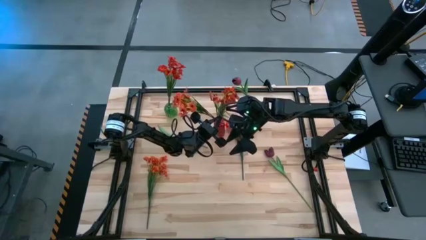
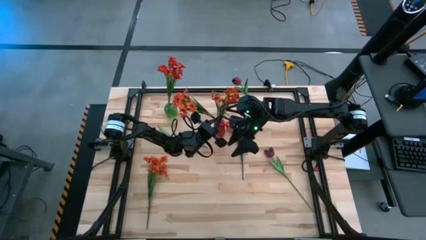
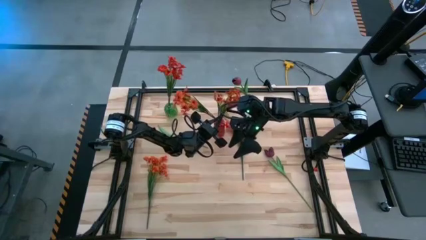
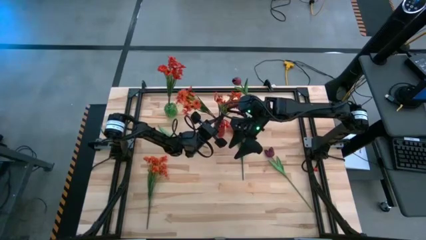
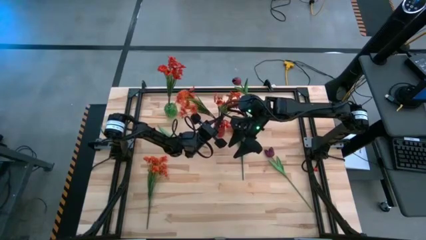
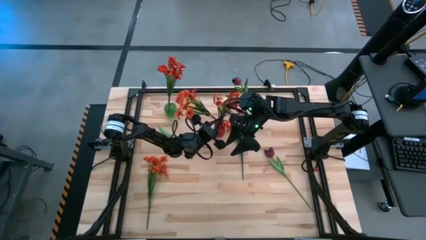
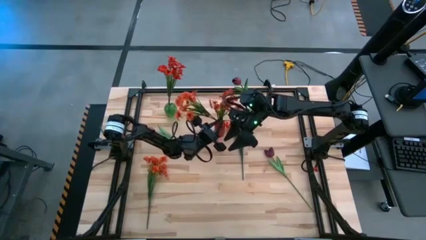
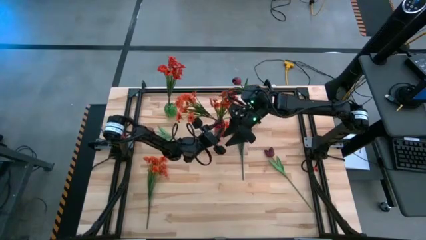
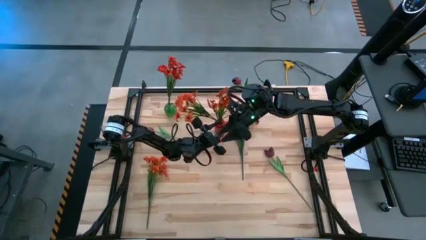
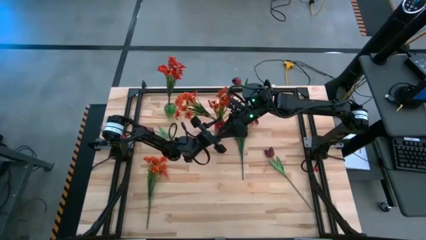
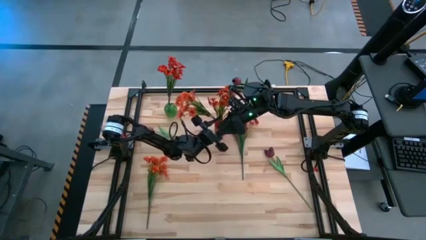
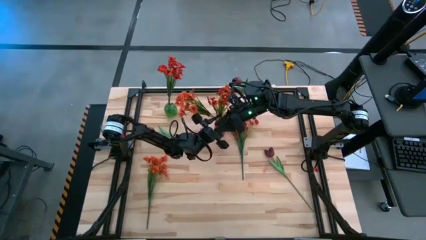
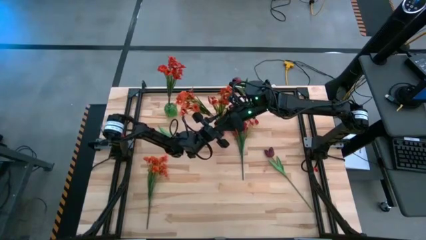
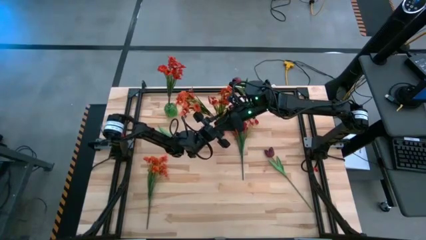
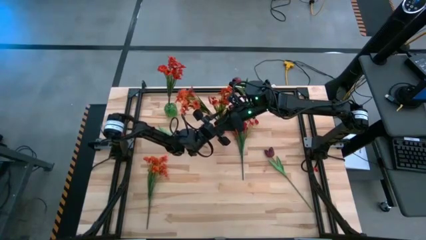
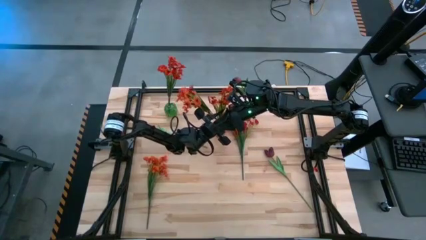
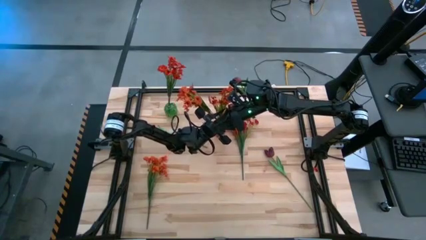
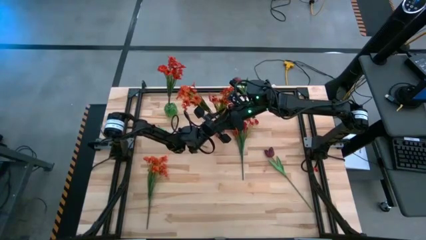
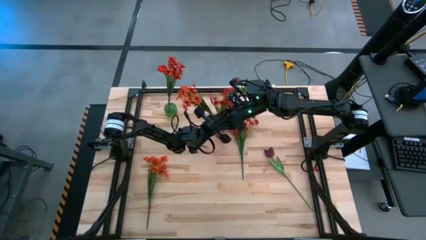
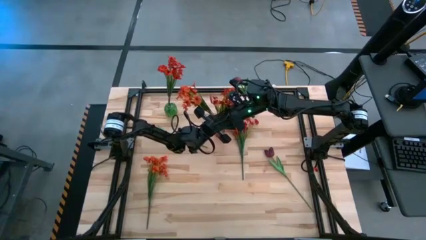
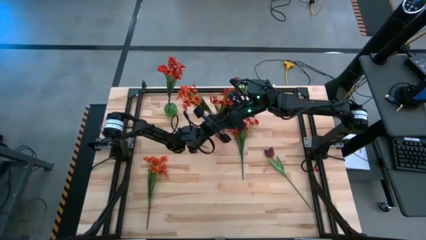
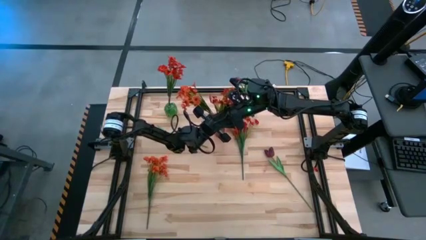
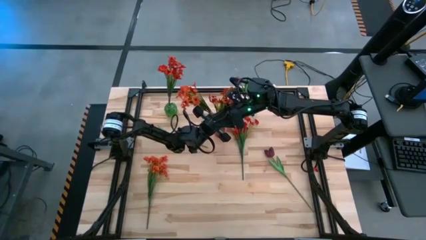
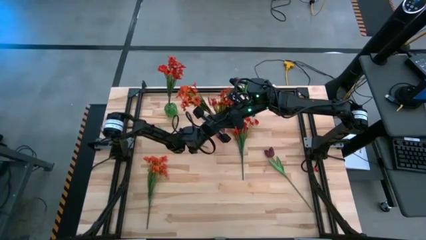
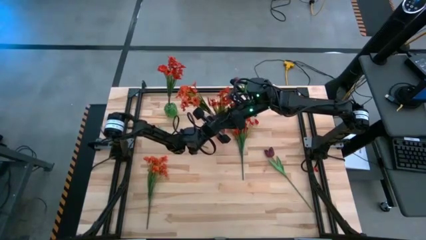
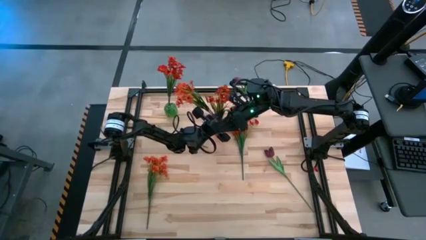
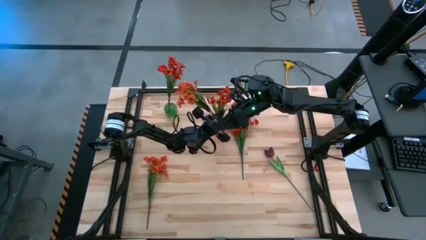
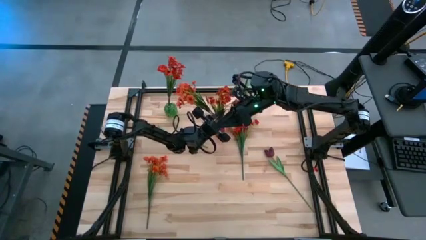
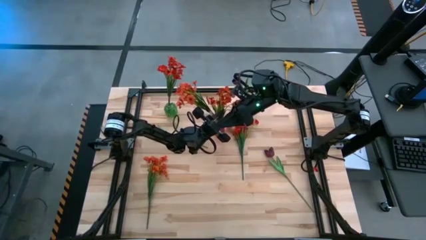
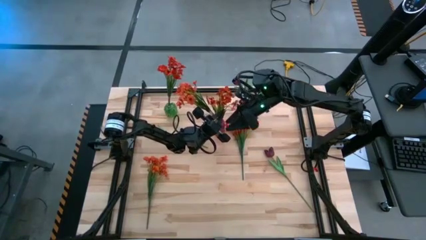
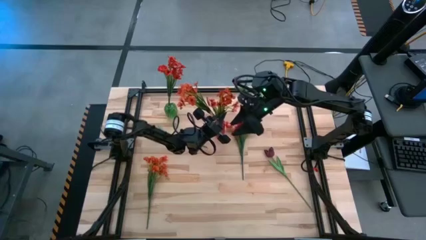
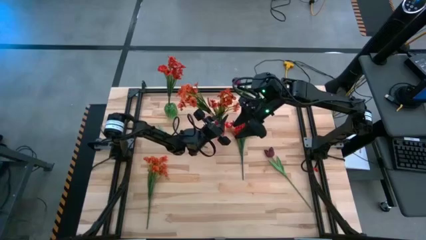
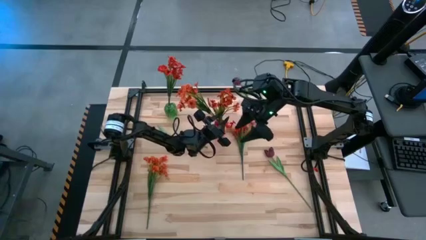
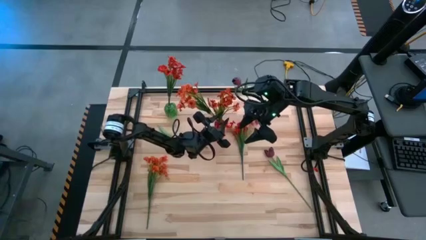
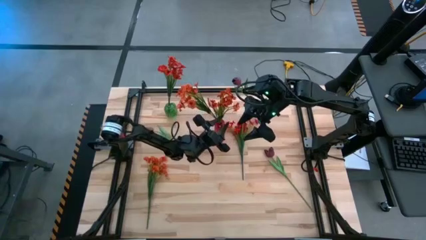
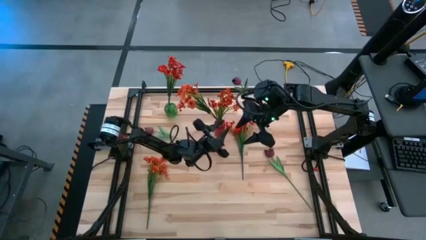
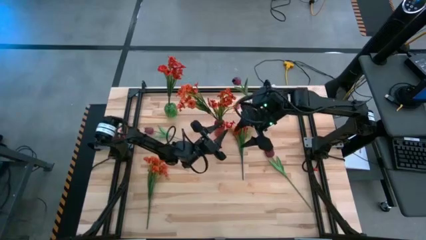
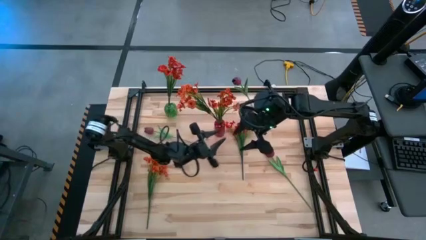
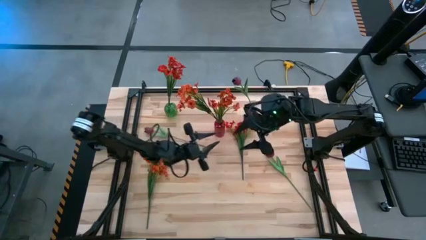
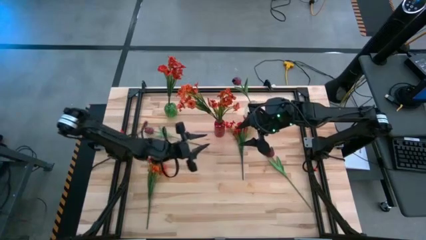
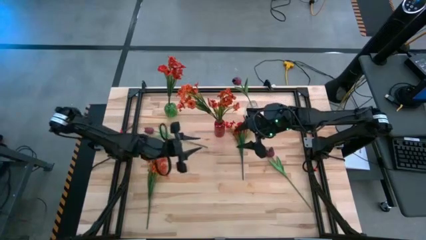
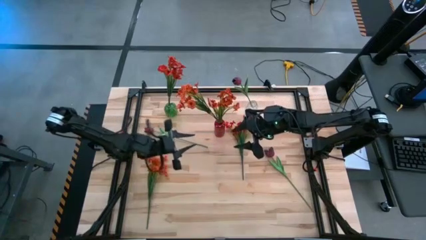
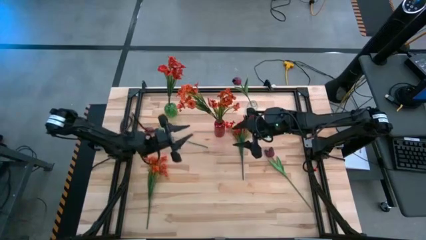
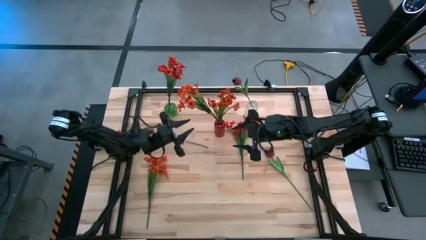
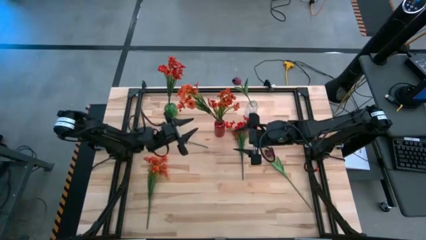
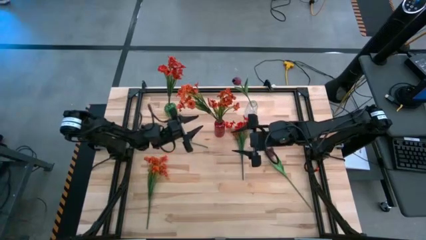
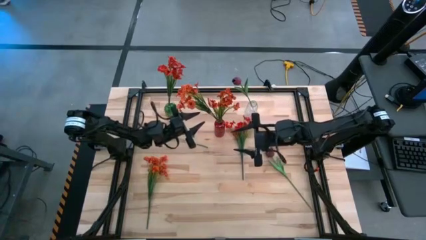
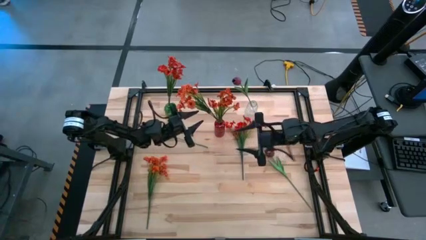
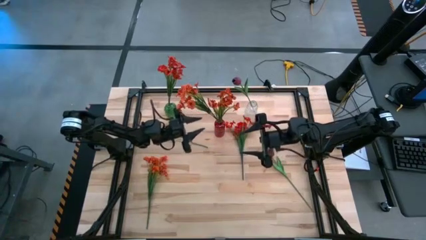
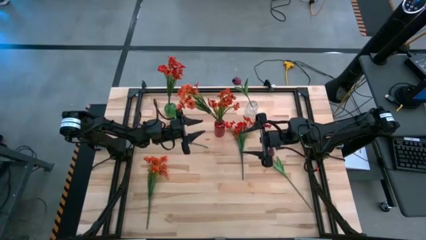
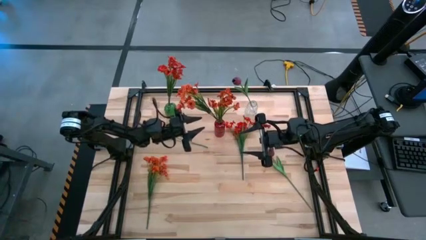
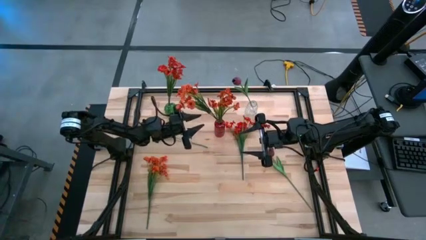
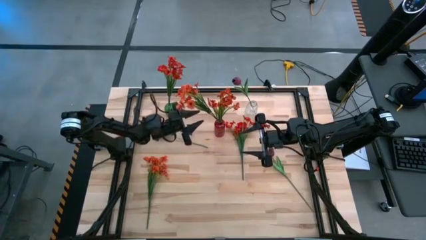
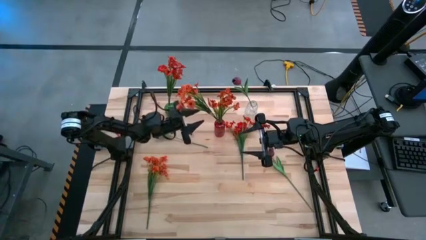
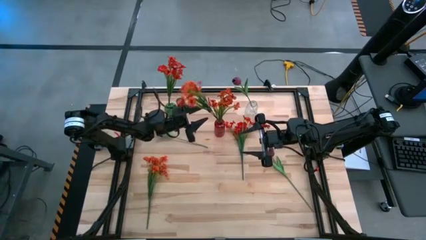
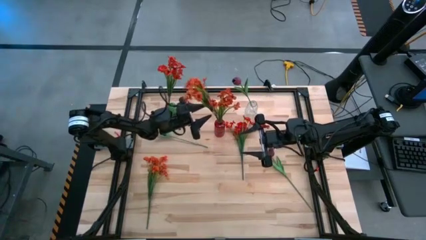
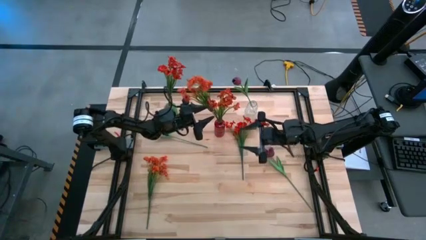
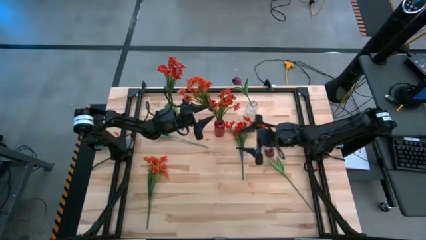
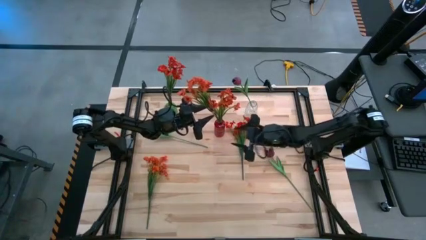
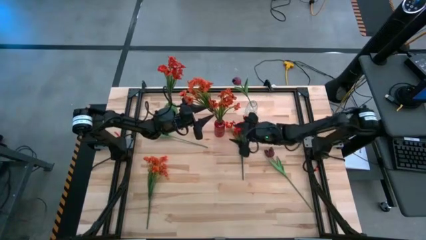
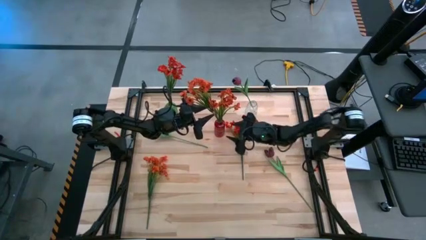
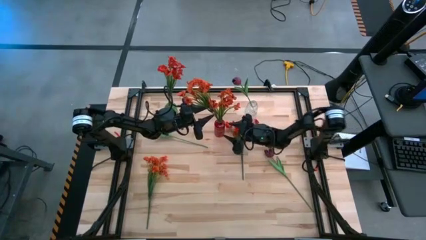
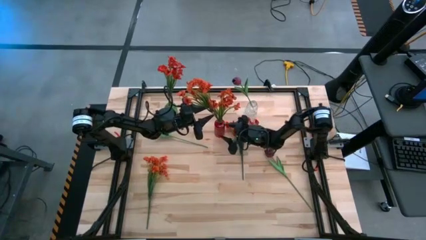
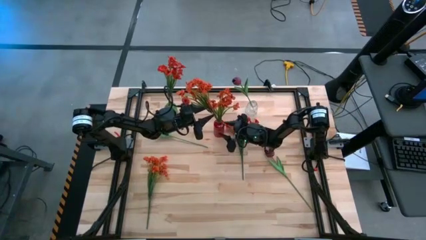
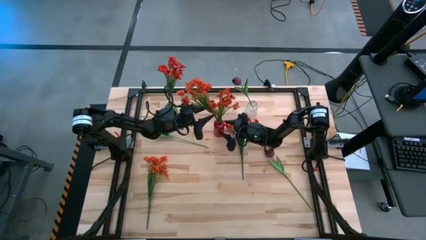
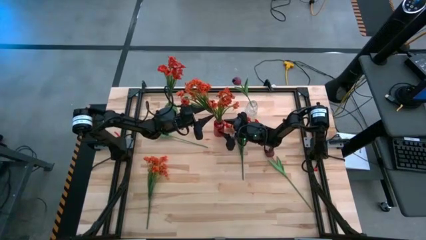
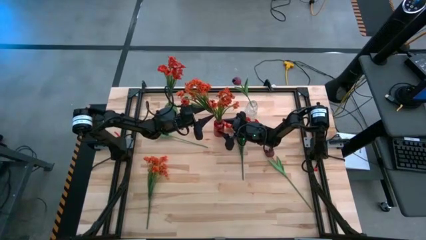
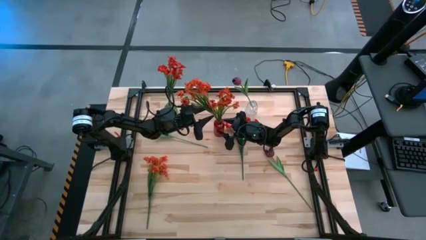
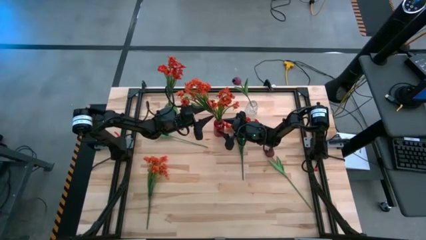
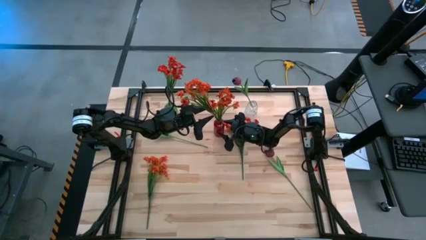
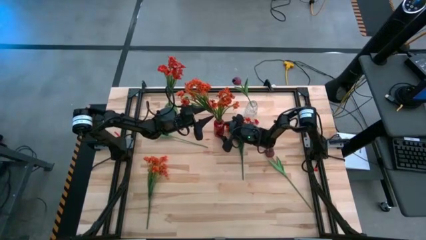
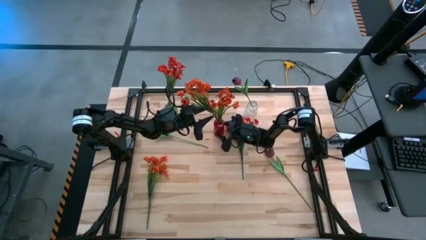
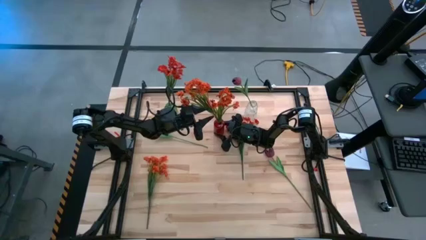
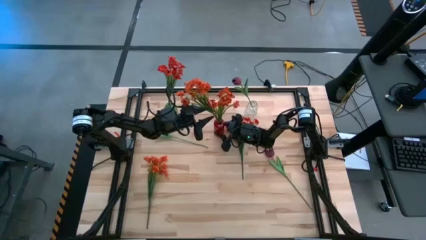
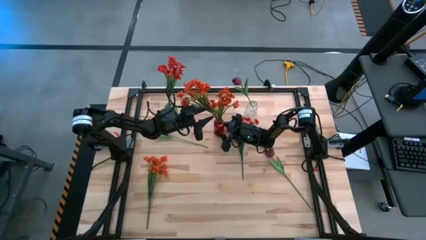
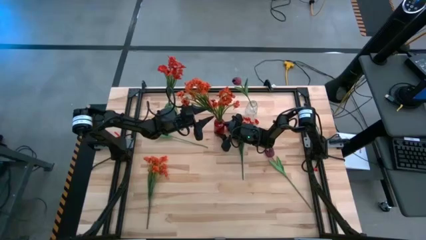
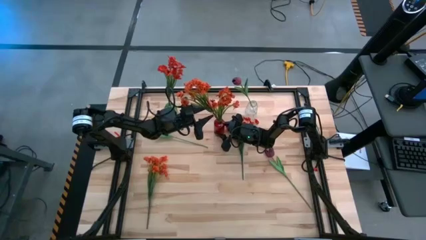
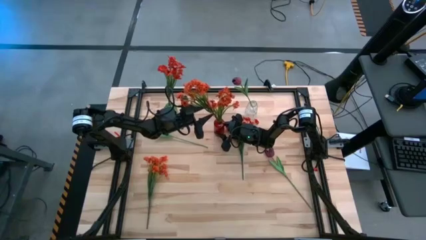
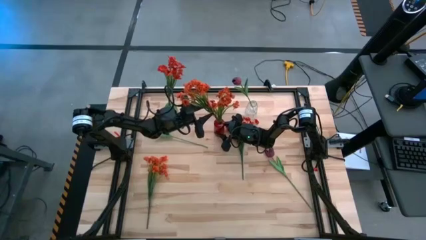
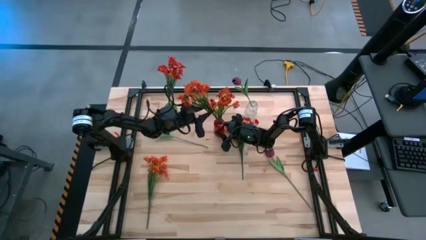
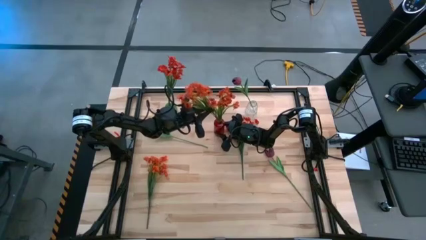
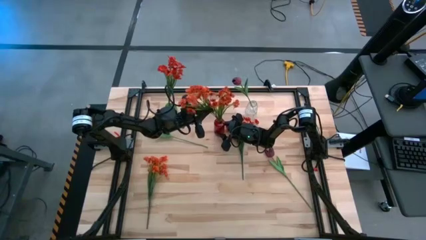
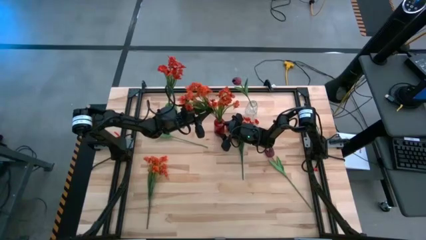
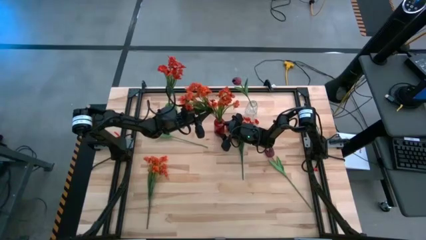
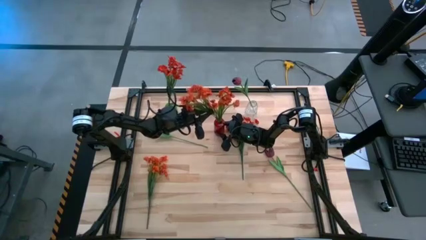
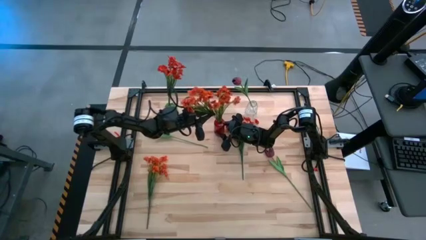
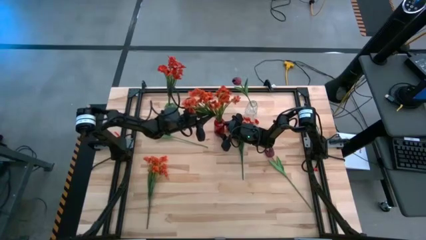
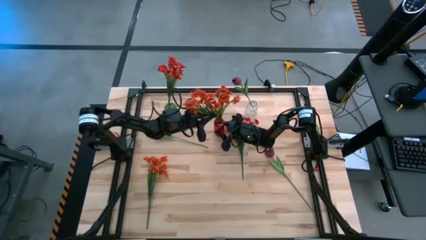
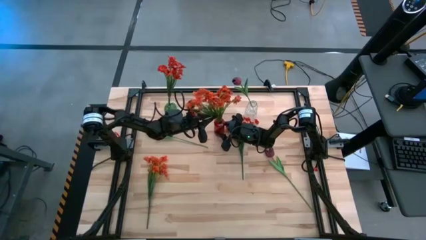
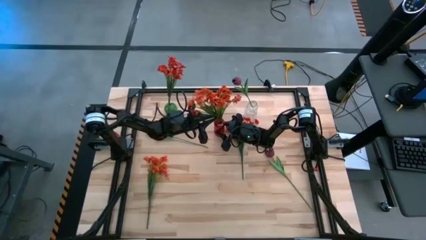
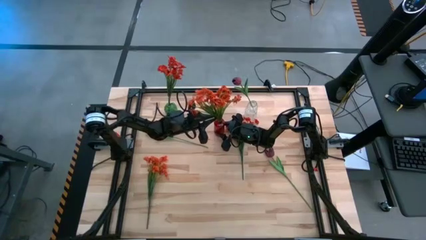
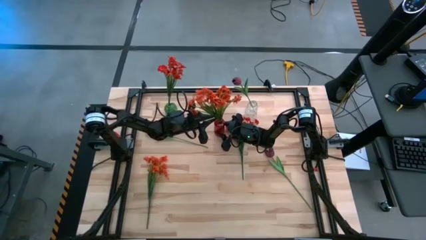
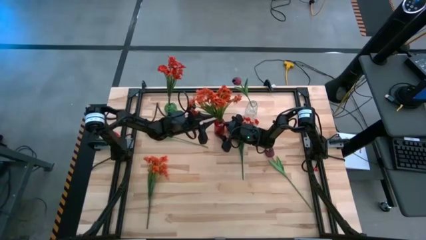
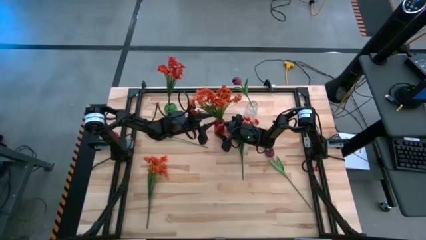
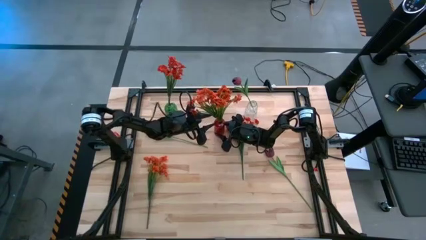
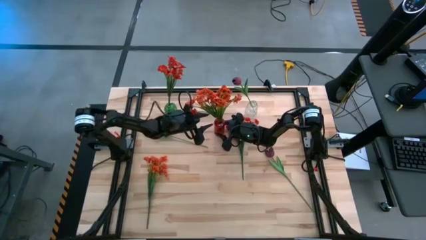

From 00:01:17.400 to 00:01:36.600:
Task: Sort flowers into vase by color
Put the top orange flowers into the red vase
